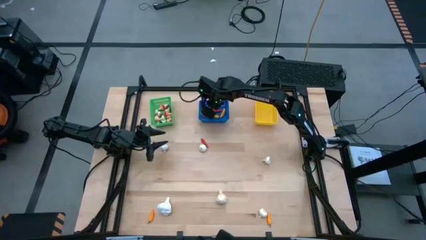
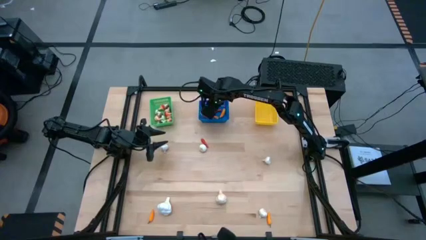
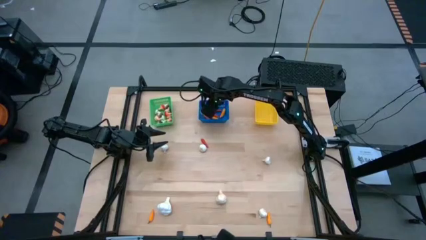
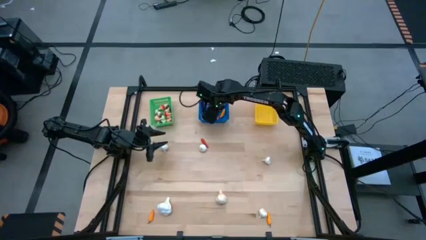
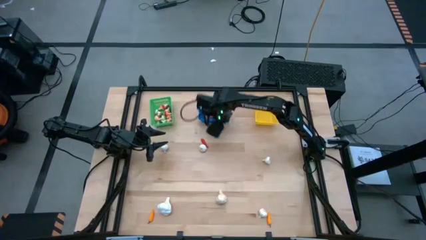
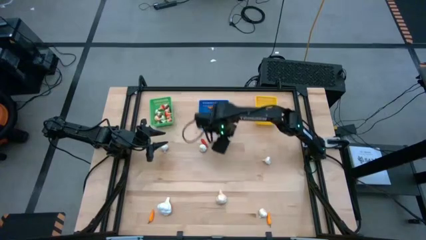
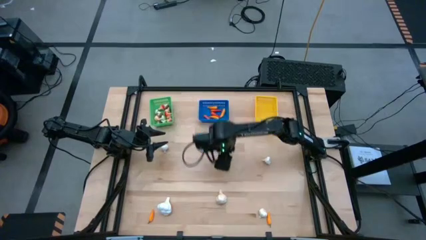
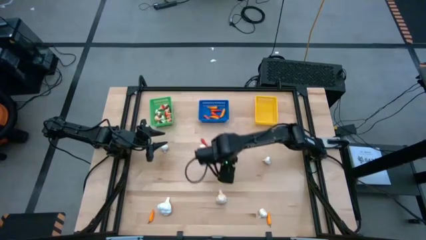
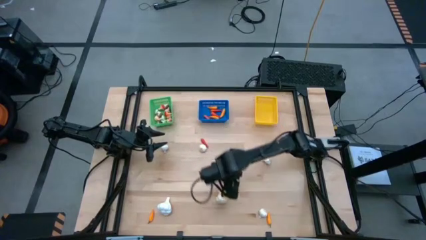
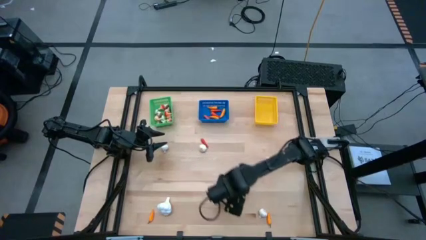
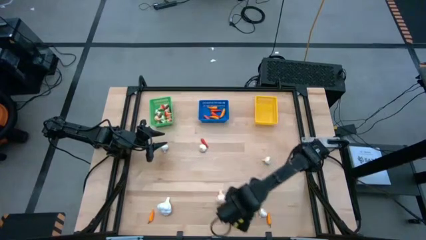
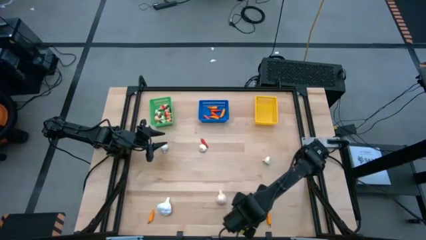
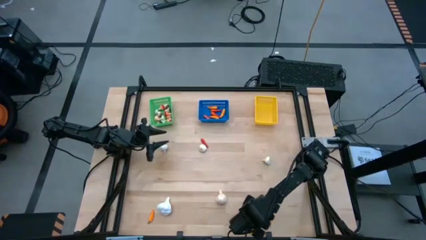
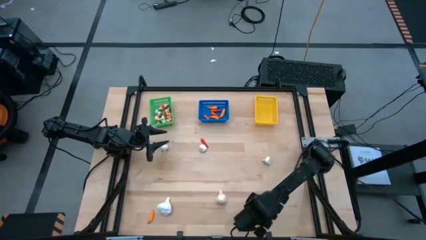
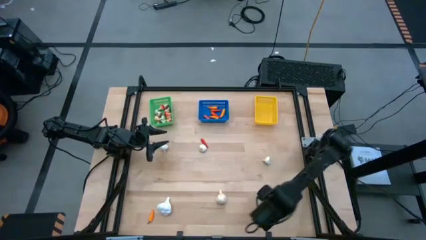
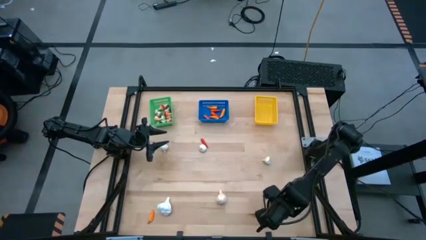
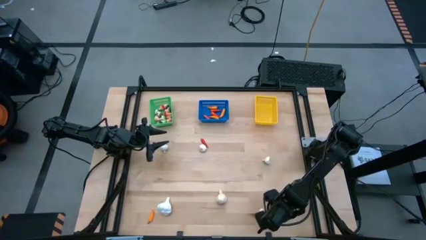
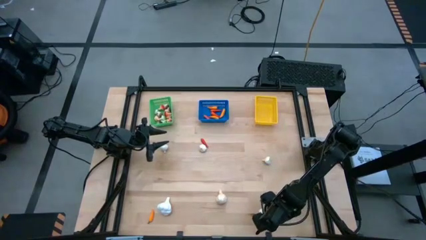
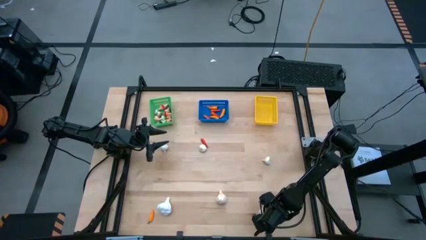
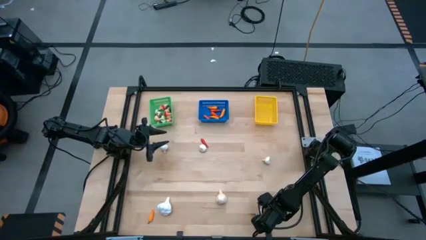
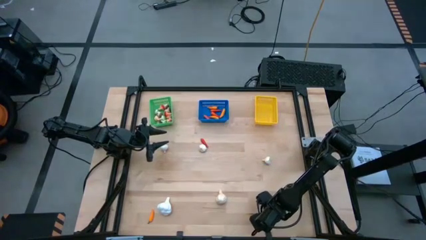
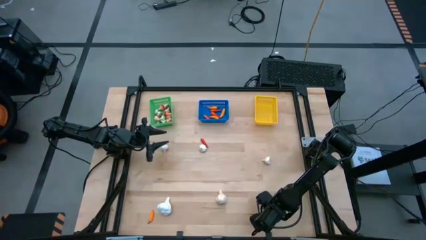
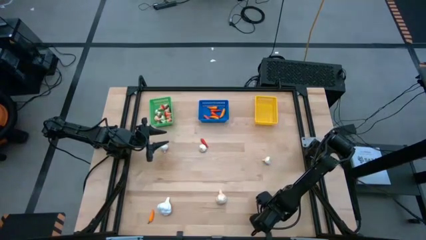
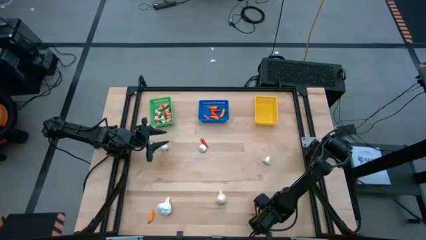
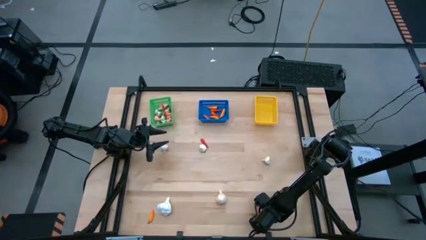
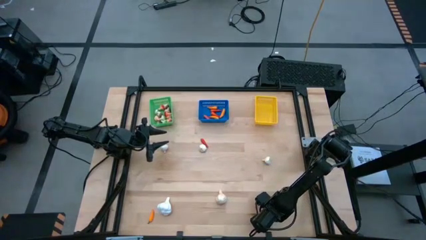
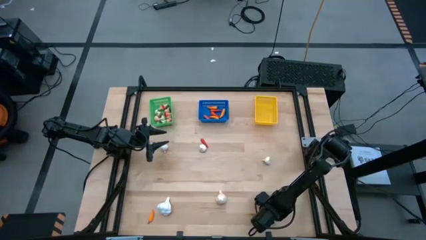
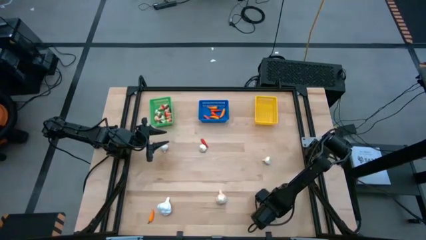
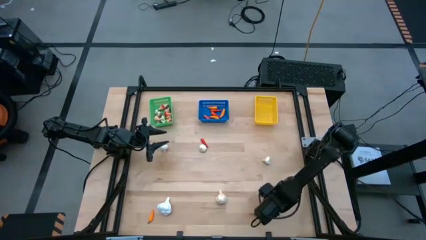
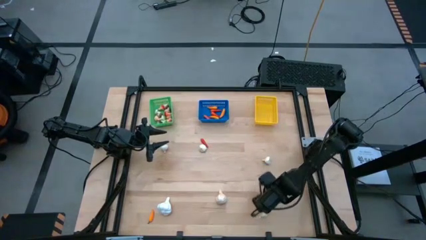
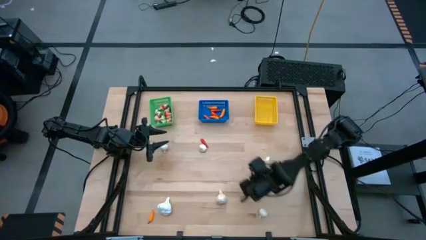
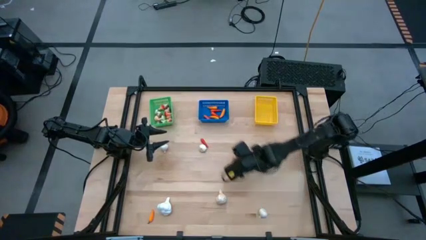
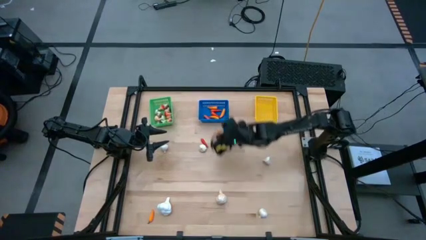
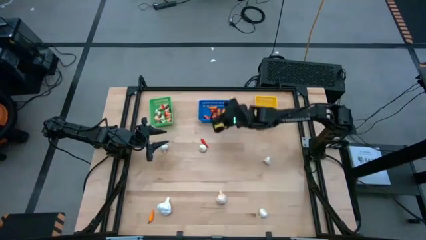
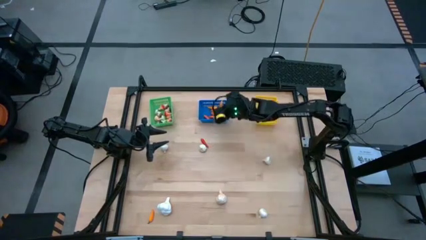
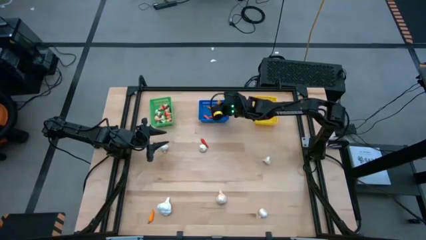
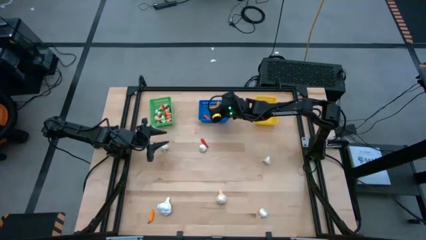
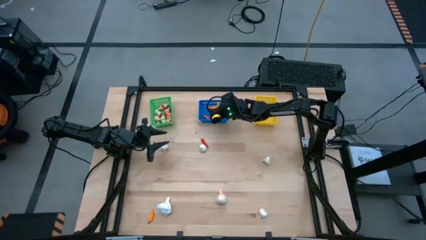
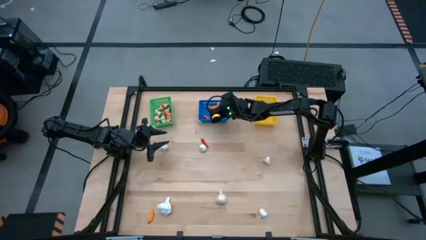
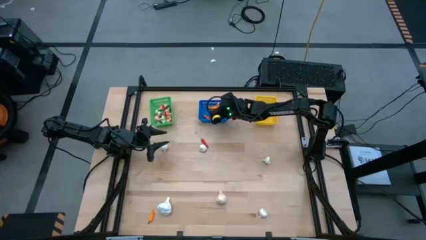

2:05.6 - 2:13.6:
Task: Sort produce into baskets
Put the yellow chili pepper into the blue bin

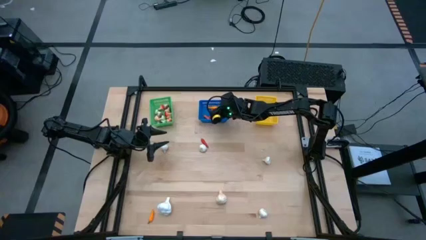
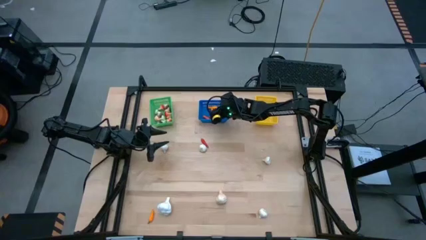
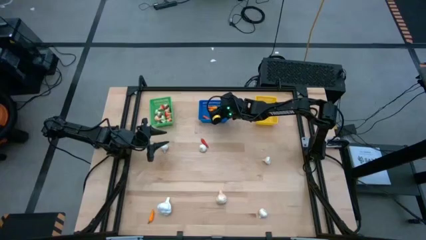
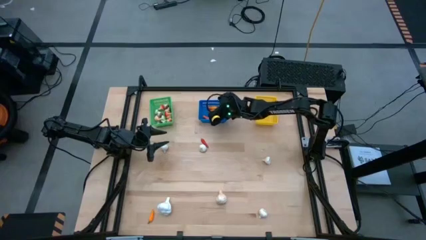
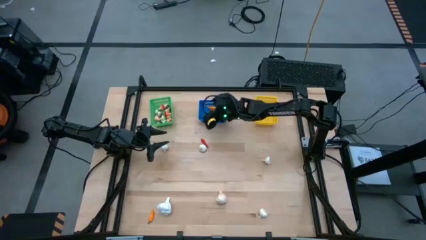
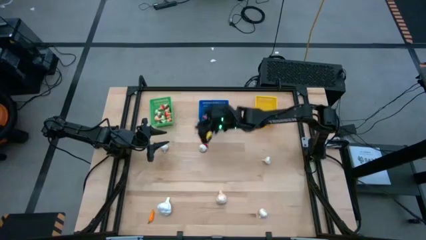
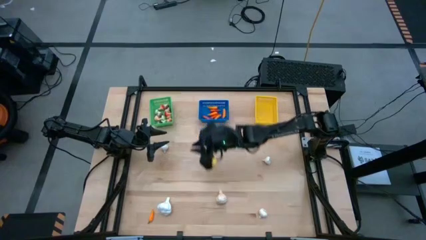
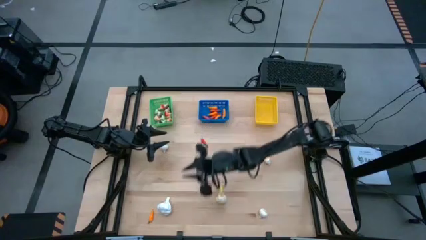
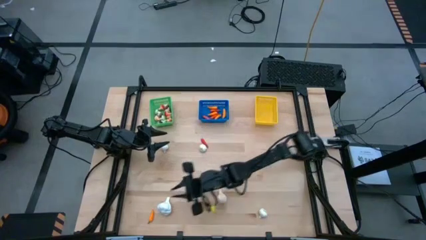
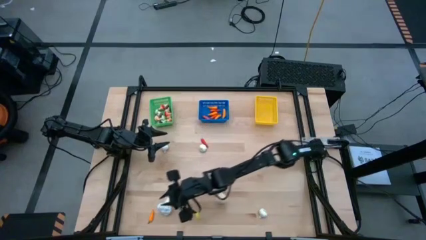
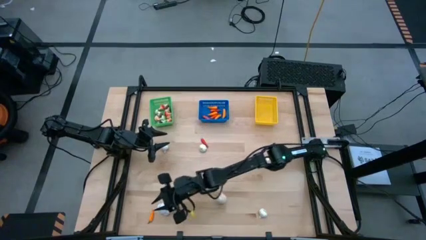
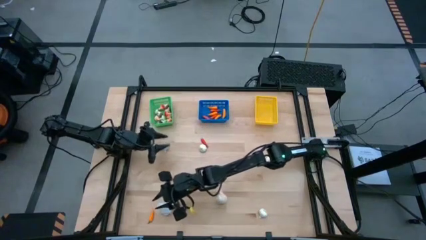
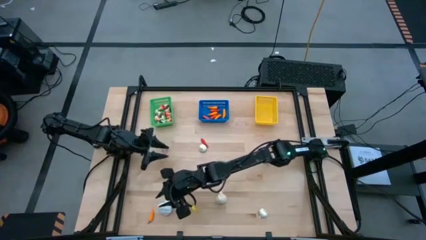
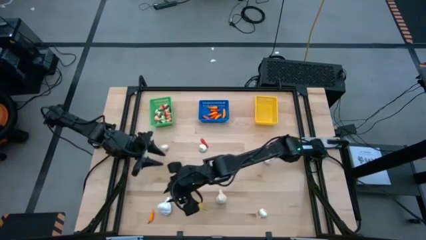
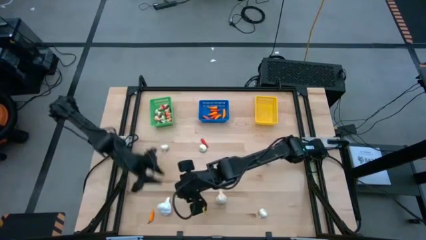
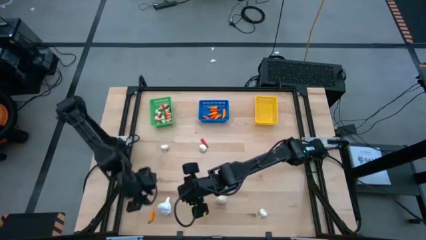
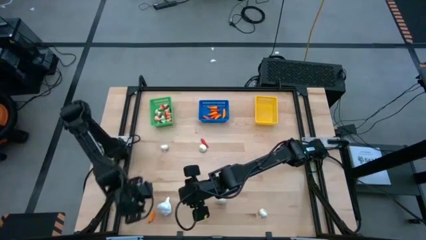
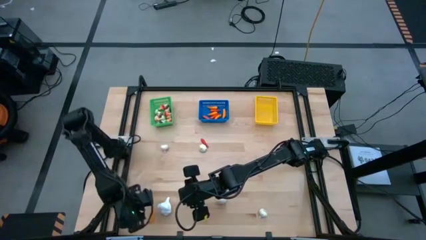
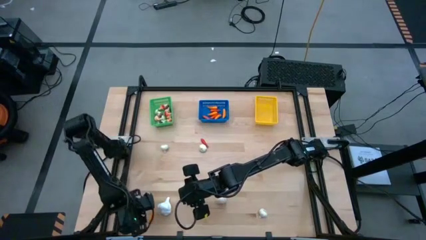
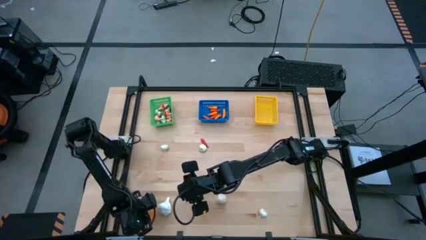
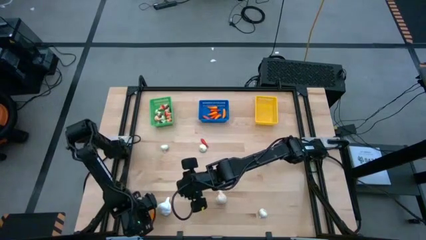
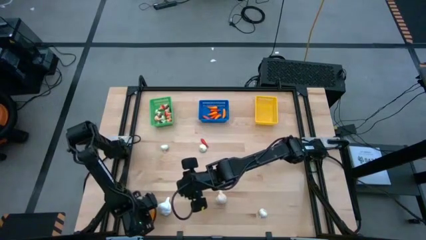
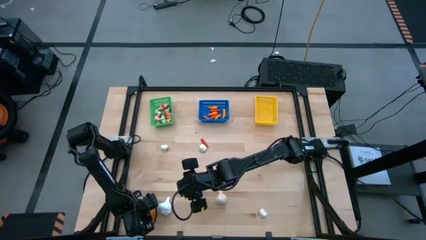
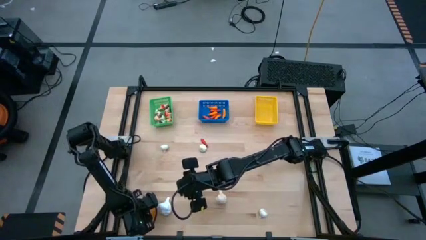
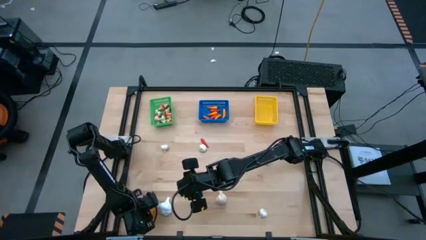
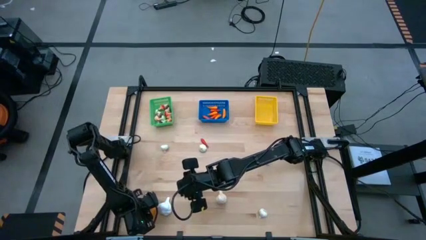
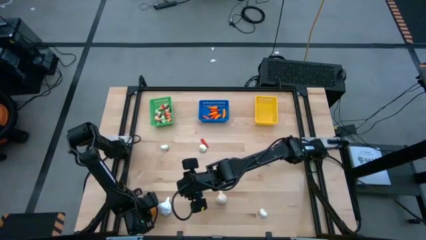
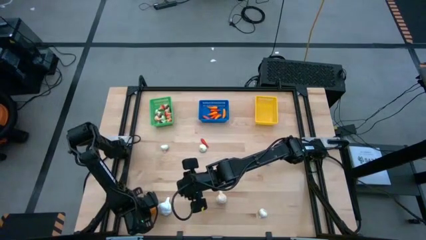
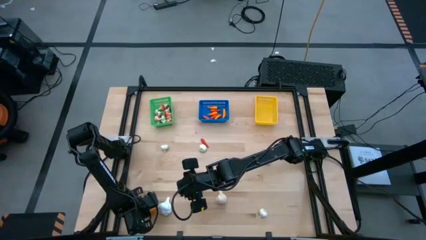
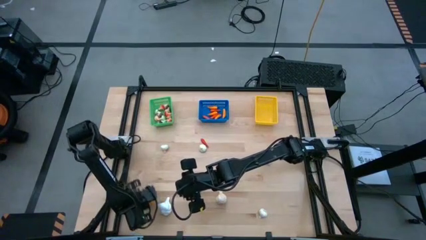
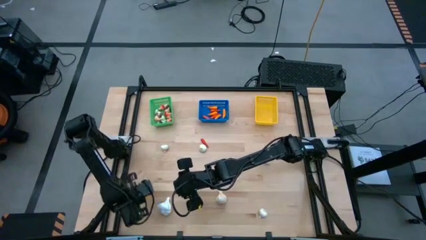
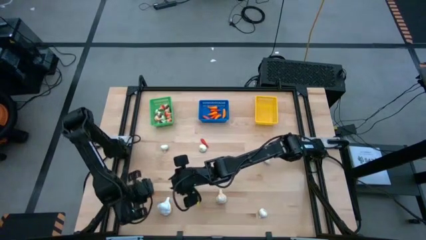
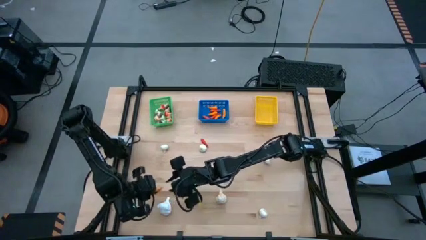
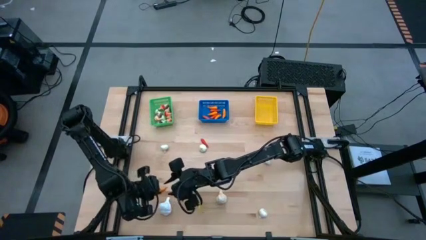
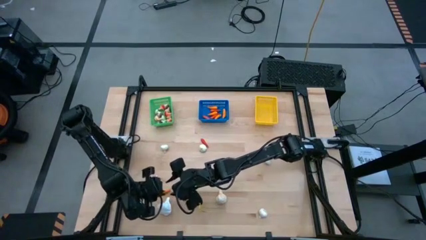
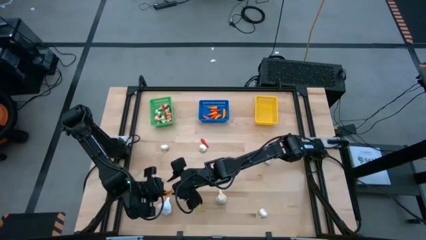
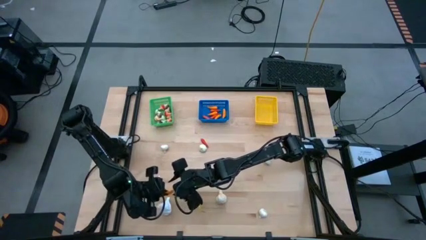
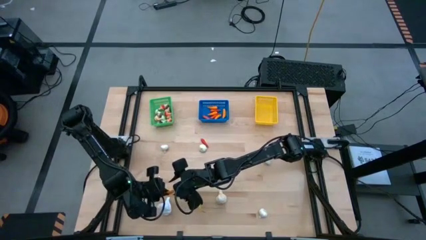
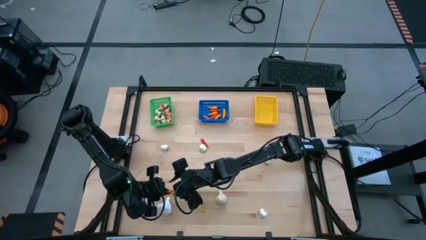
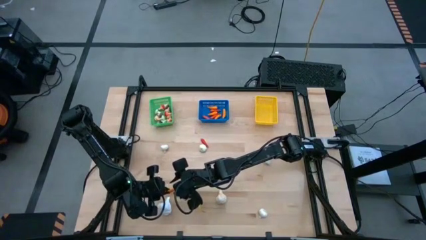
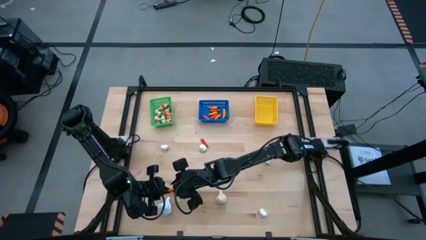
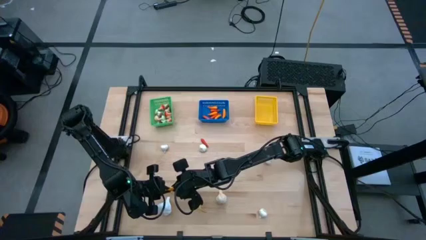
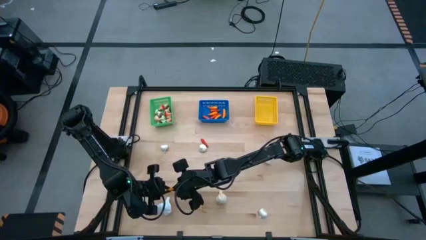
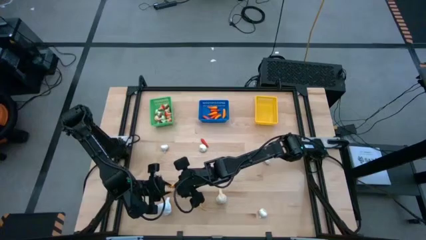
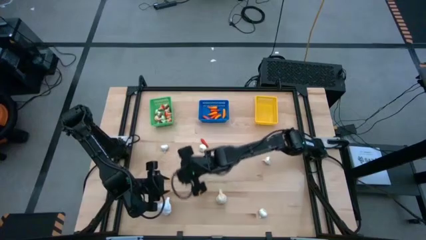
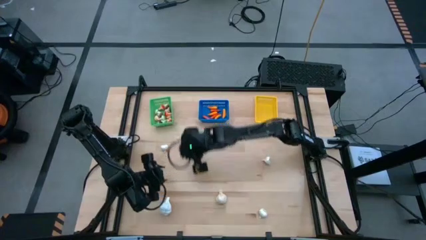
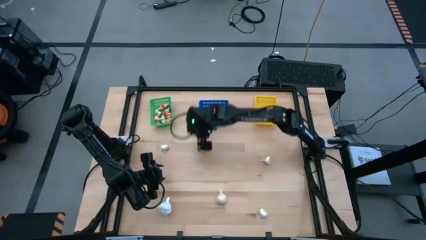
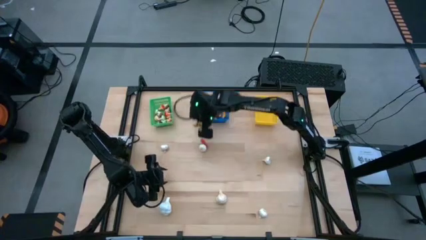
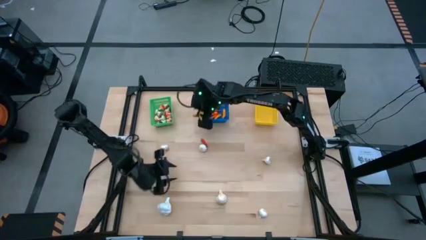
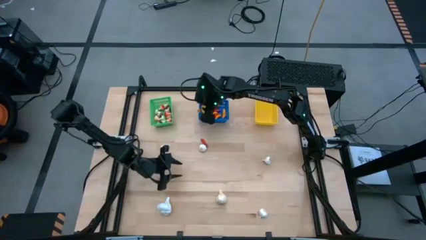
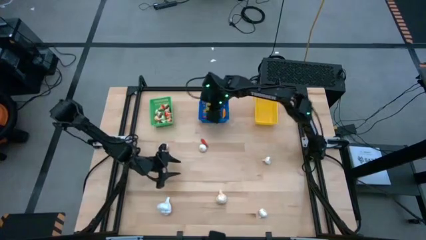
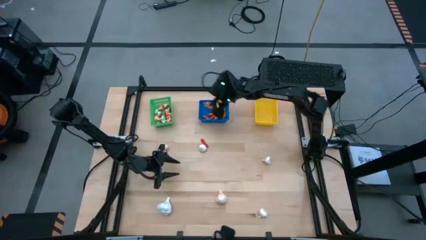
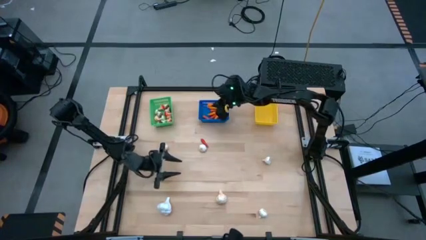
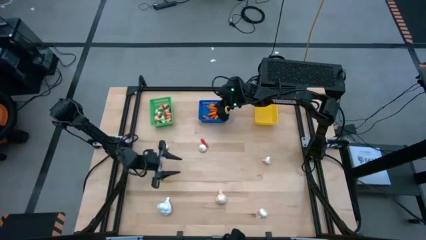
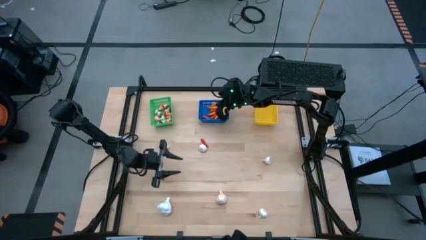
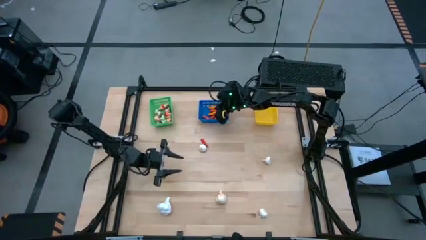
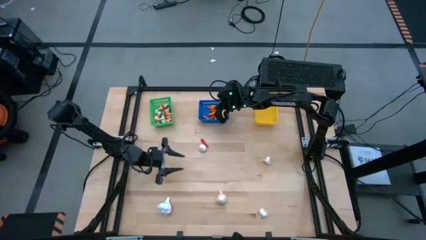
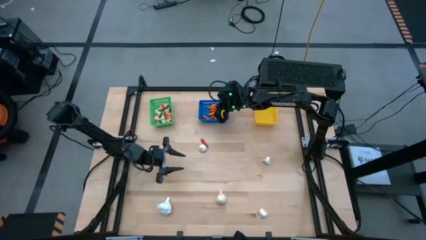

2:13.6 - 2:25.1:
Put the yellow chili pepper into the blue bin
